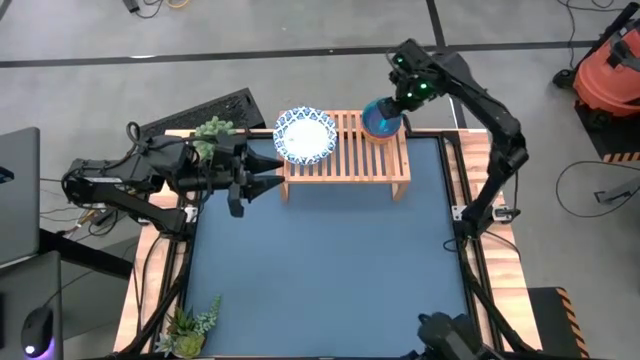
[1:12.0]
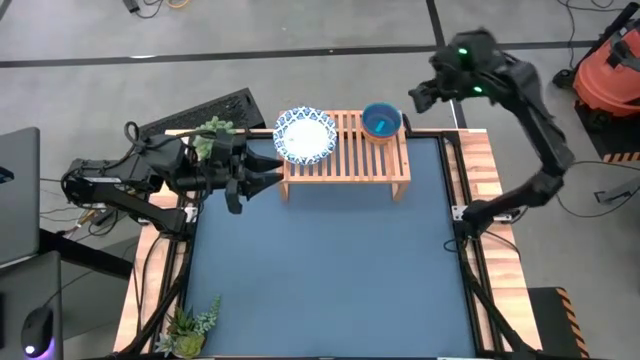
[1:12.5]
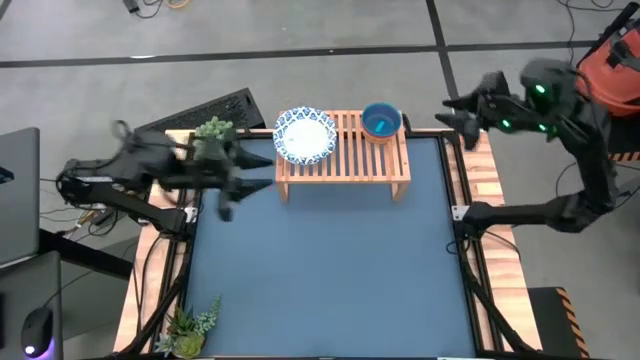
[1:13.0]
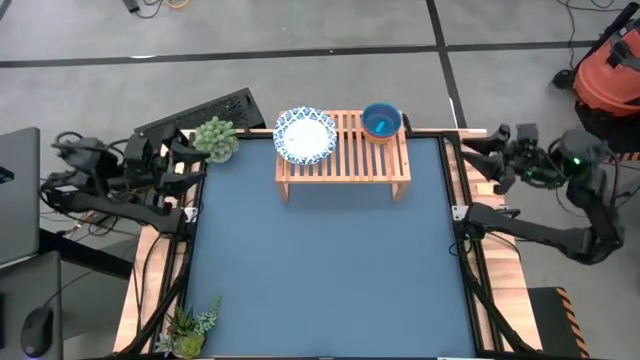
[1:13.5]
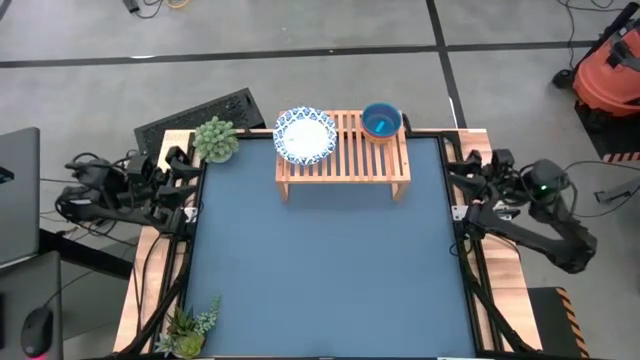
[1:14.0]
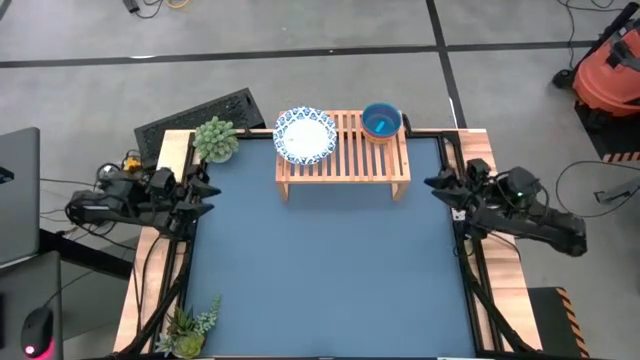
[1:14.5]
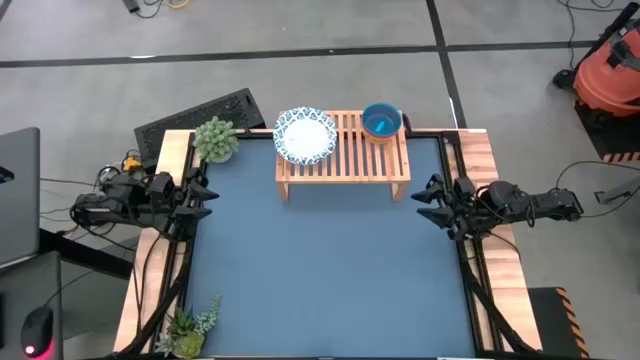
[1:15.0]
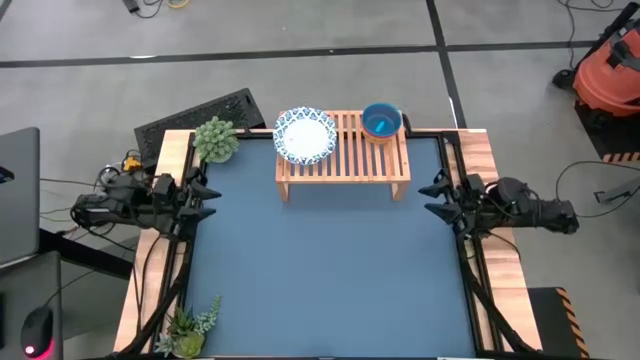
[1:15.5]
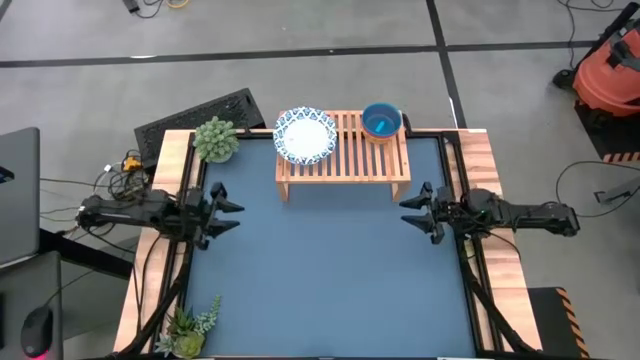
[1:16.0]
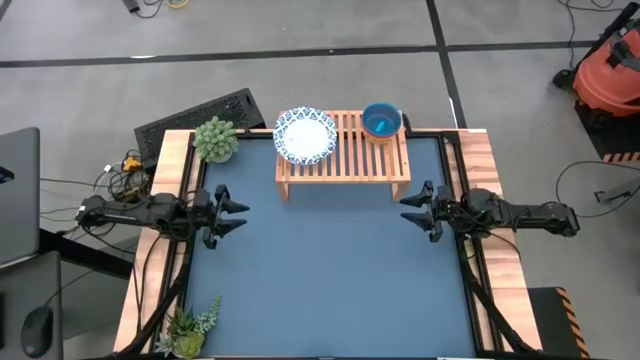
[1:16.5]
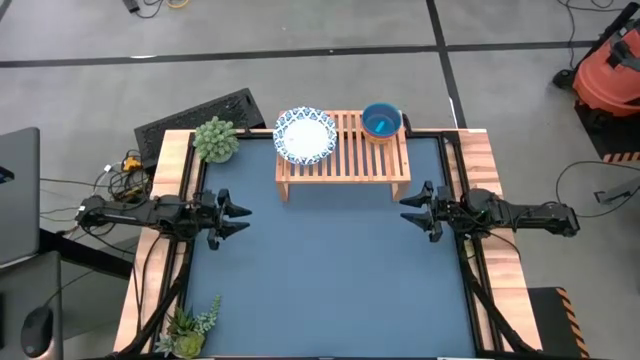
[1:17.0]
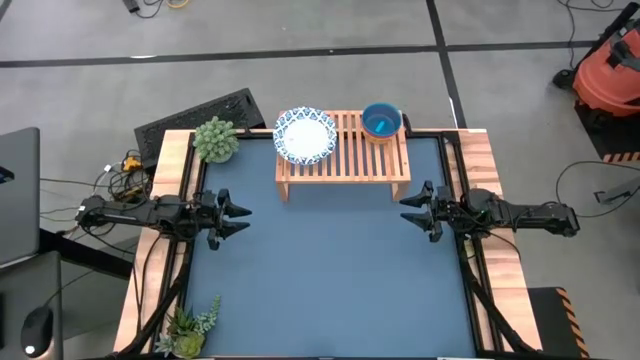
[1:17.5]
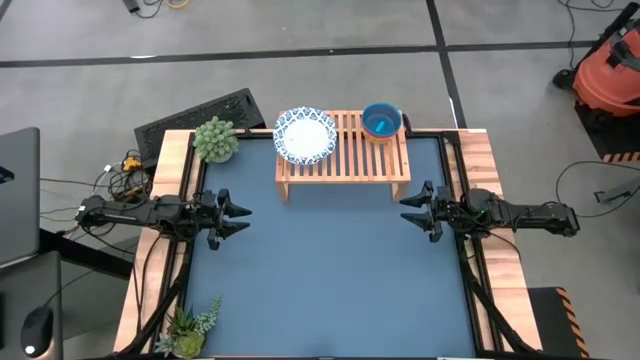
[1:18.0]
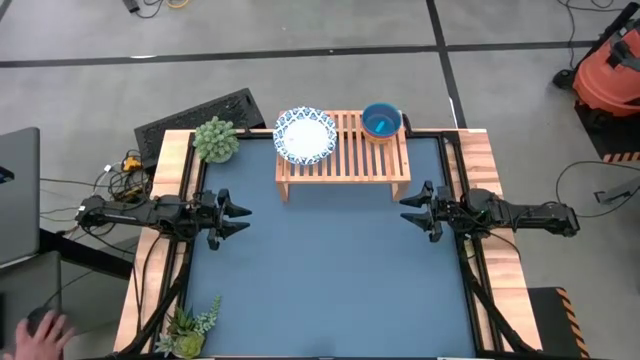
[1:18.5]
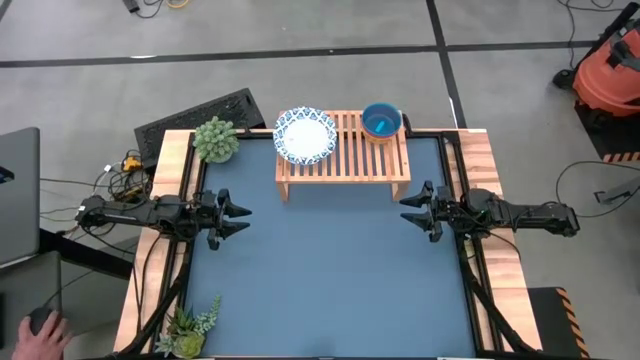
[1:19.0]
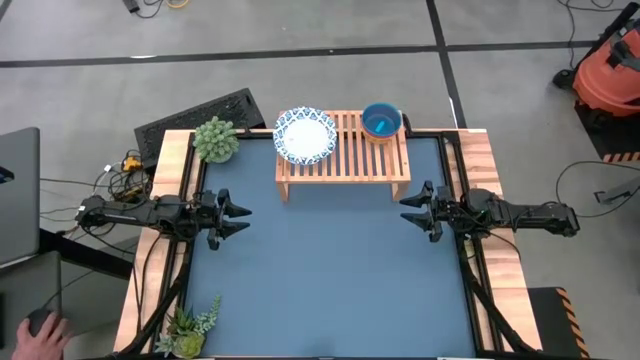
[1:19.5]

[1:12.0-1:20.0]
Task: Place and stack bowls onto a shelf
Return to Home Position

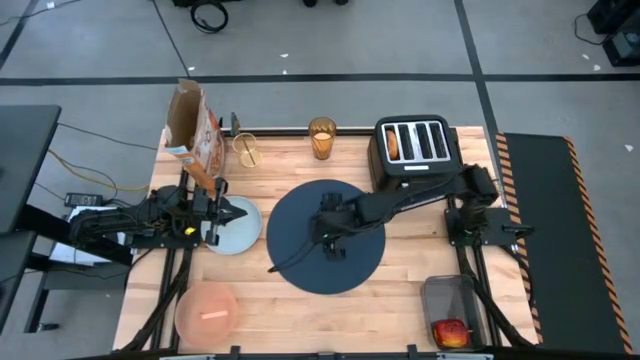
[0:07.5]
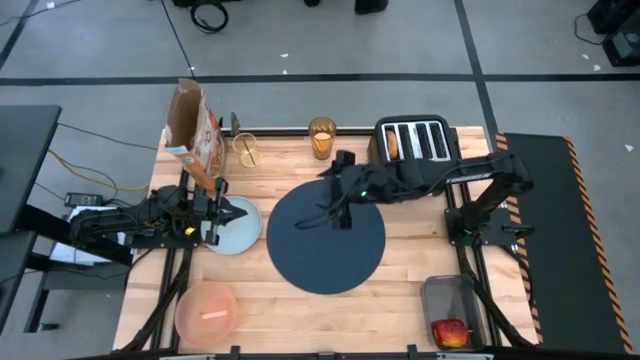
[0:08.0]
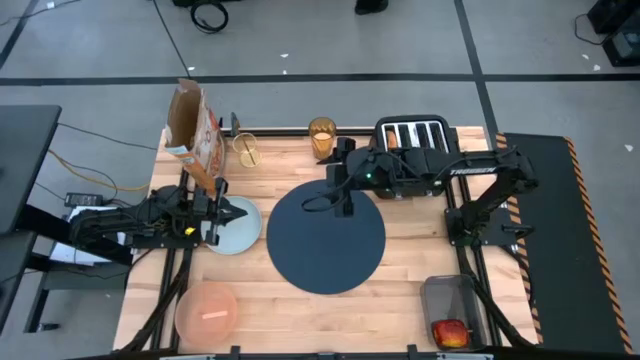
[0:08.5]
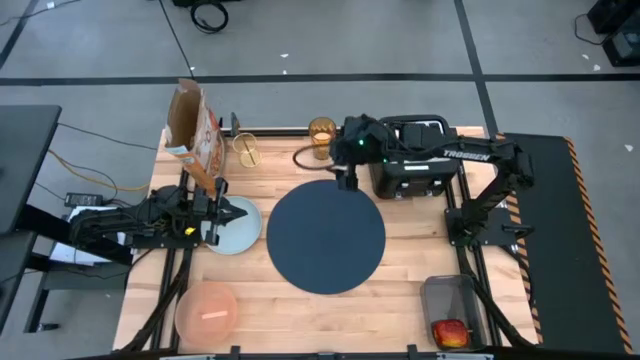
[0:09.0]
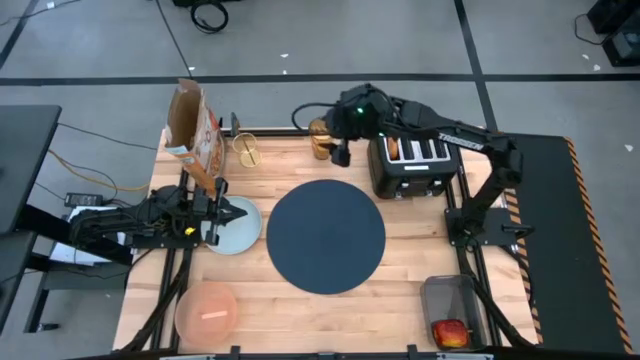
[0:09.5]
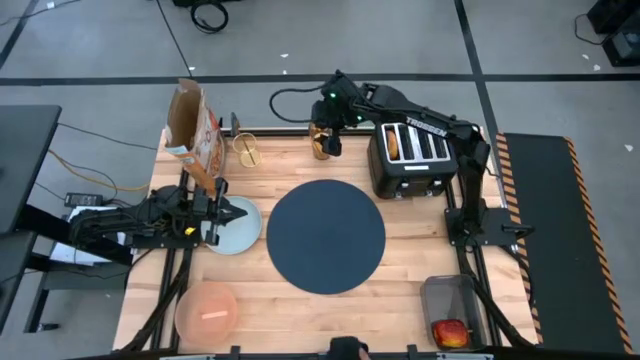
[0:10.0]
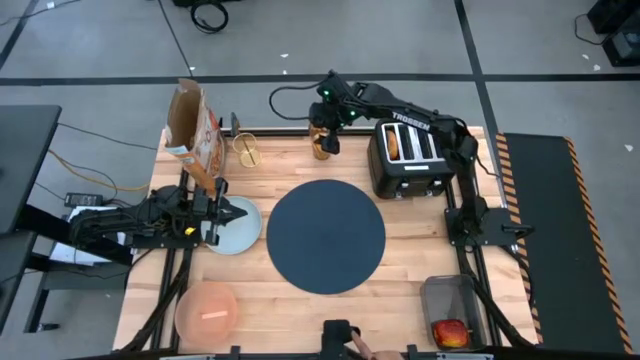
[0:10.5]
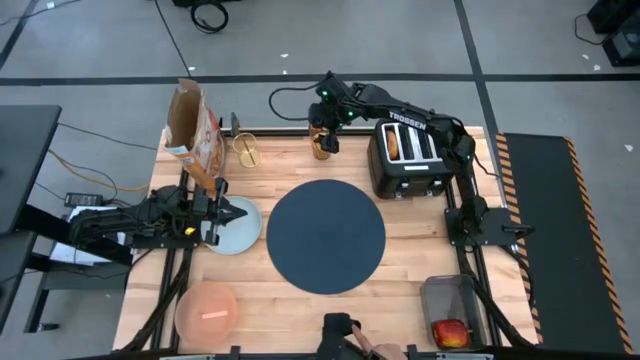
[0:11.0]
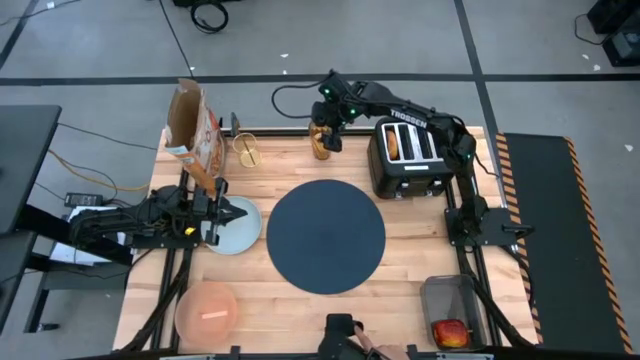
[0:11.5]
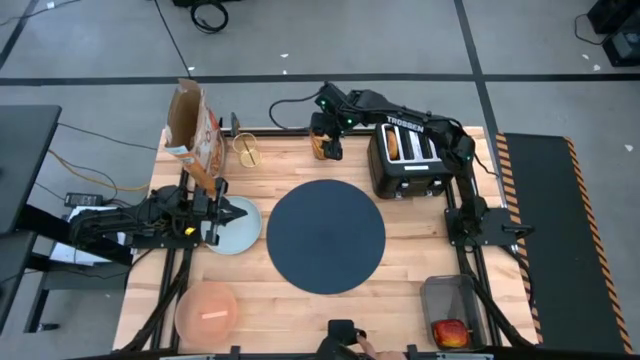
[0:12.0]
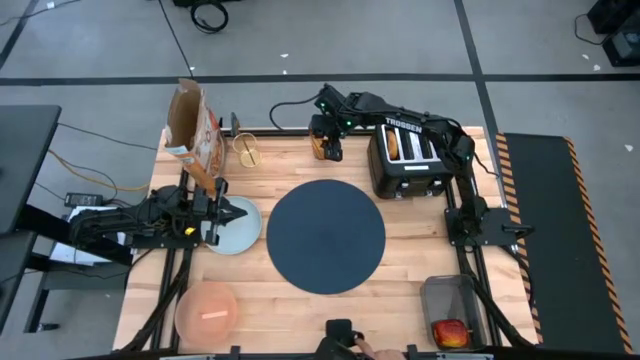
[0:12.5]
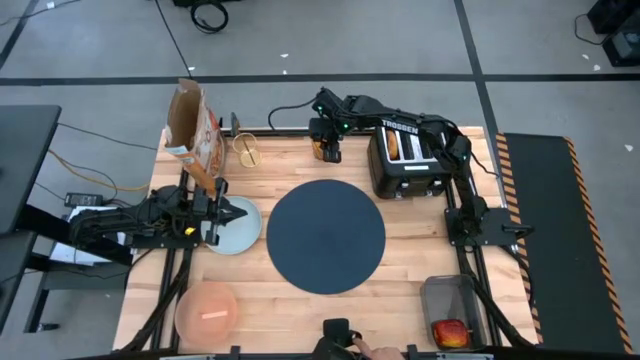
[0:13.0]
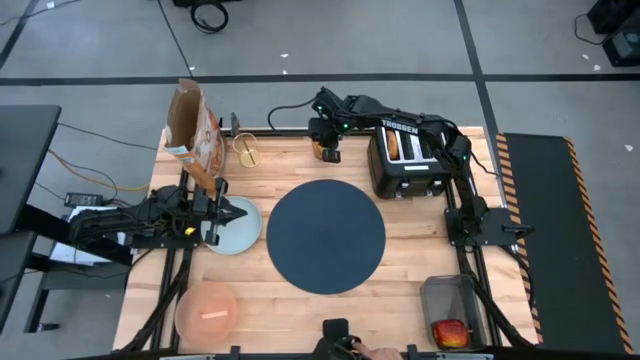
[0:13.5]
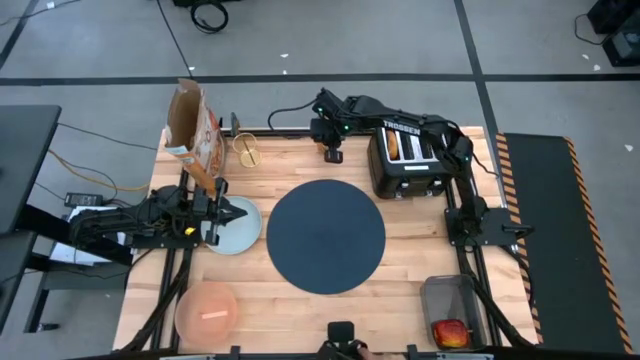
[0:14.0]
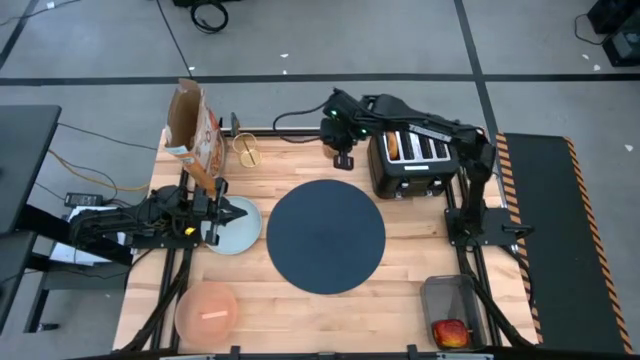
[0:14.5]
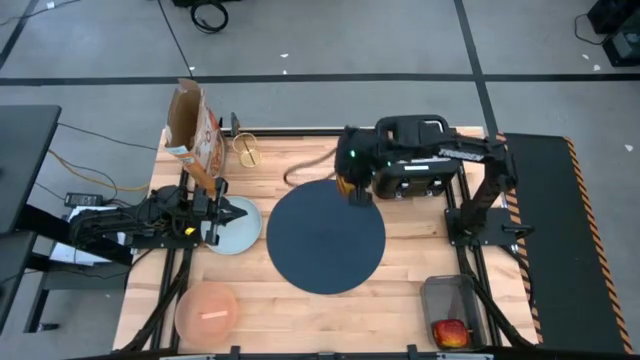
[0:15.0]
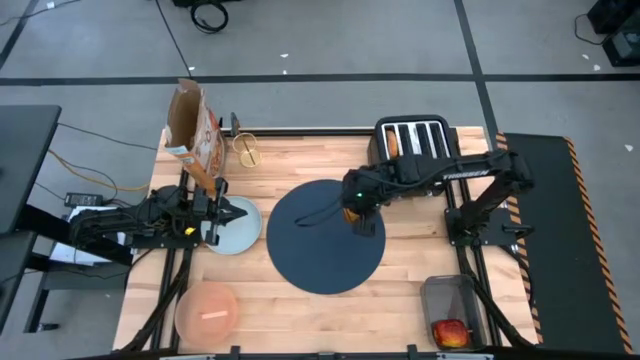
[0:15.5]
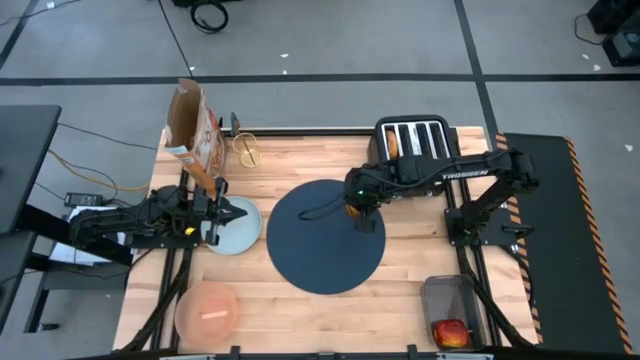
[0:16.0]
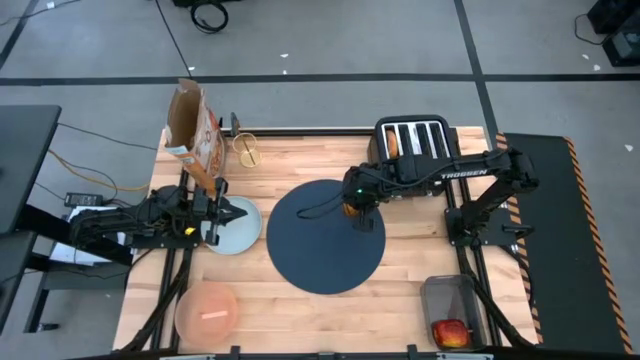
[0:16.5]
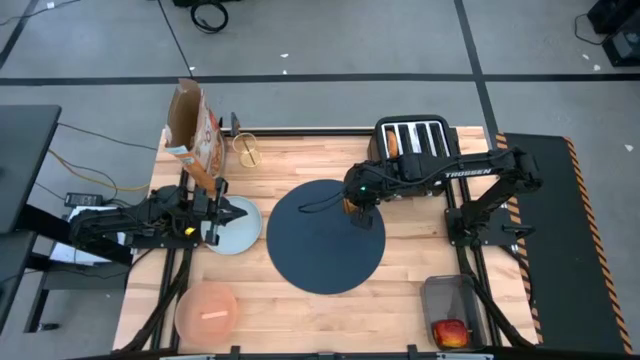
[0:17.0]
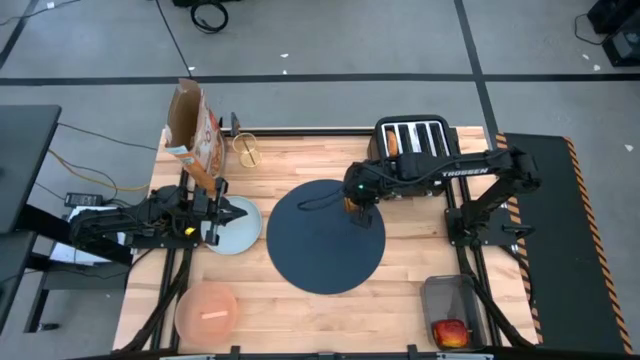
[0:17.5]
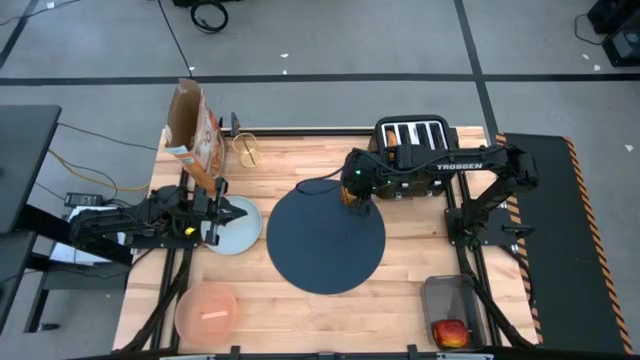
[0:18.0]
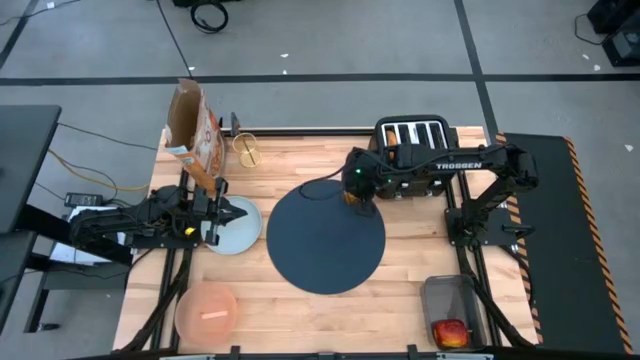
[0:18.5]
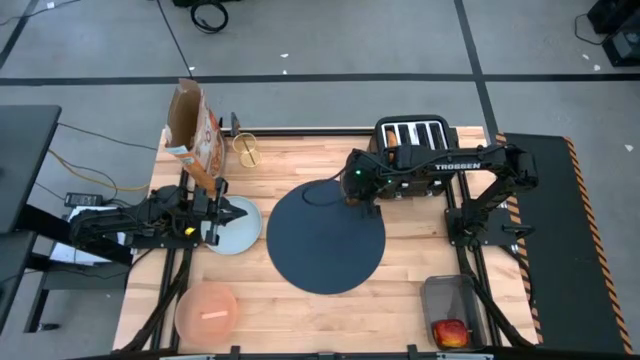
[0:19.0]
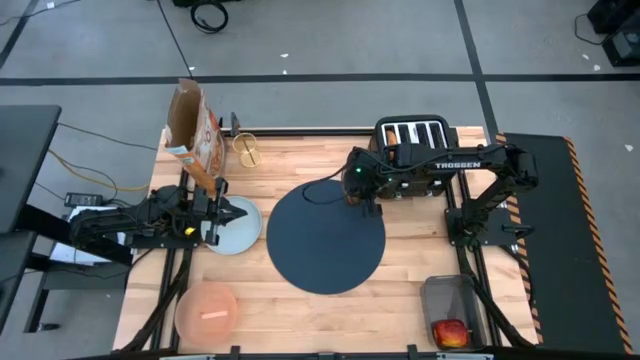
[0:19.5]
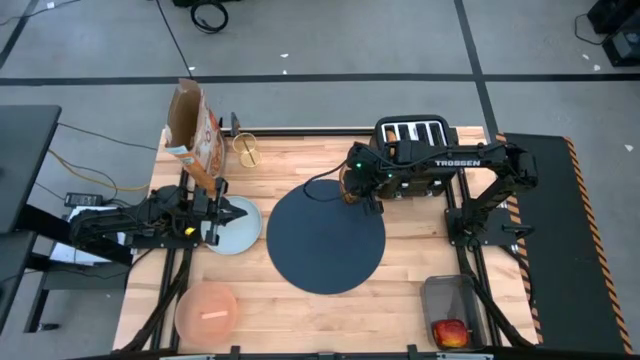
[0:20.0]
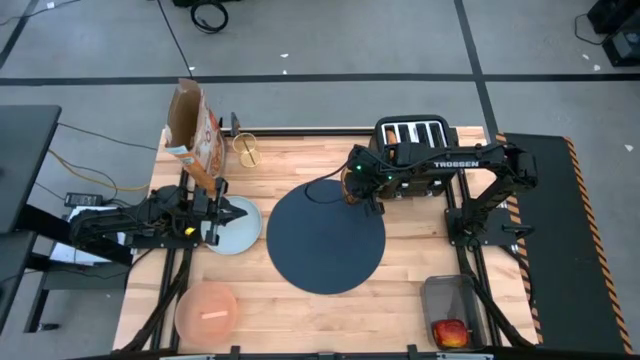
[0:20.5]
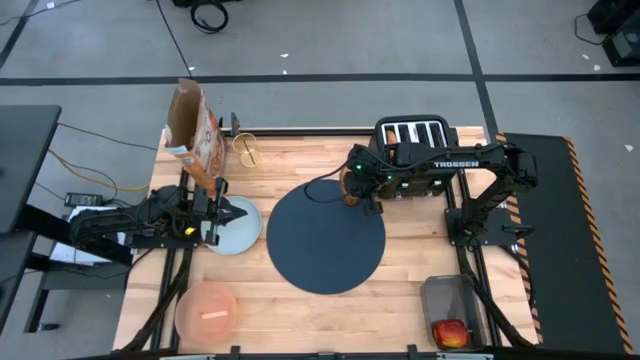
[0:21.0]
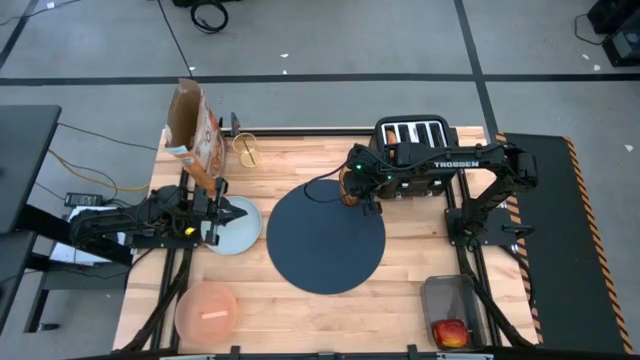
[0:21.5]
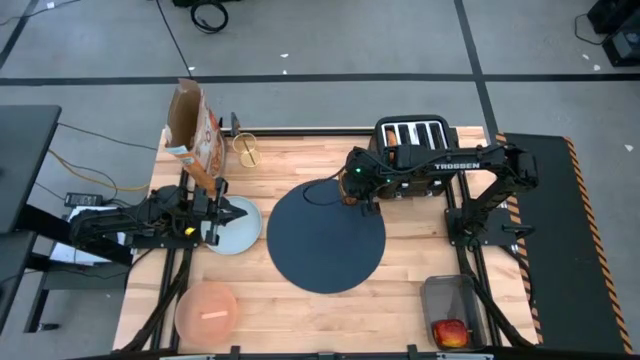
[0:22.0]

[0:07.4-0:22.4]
Task: Arrange a breakfast setting
Put the brown cup of milk on the top right of the blue table placemat
